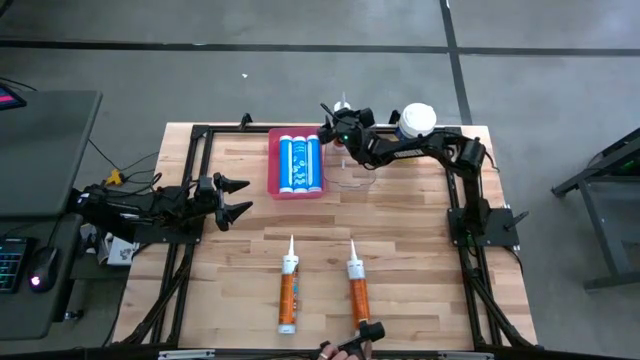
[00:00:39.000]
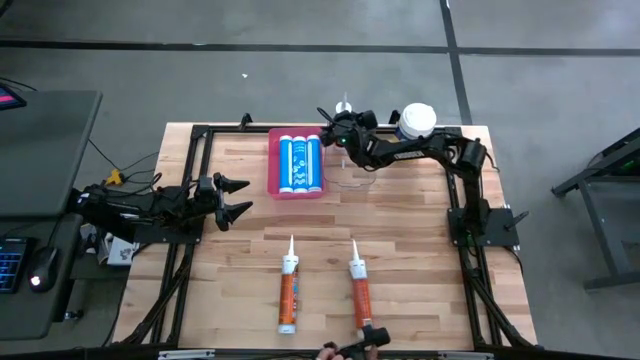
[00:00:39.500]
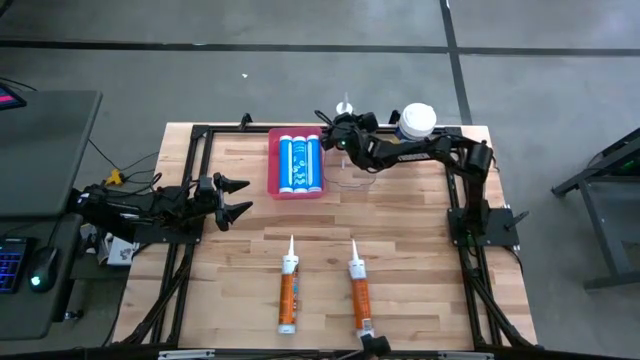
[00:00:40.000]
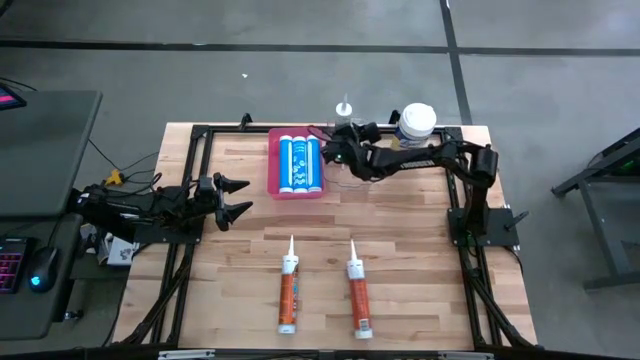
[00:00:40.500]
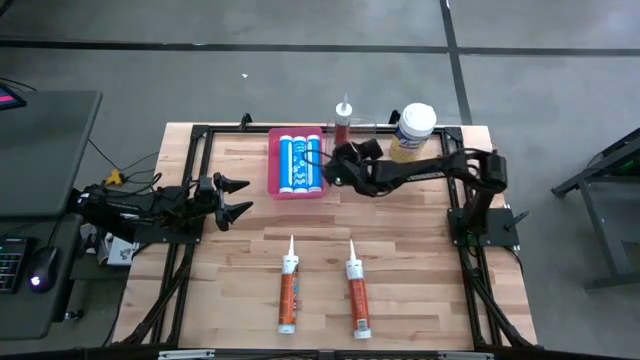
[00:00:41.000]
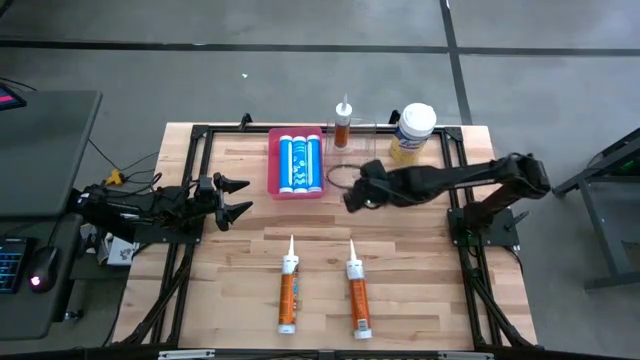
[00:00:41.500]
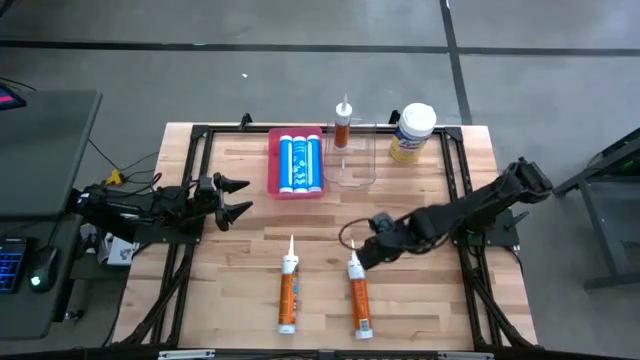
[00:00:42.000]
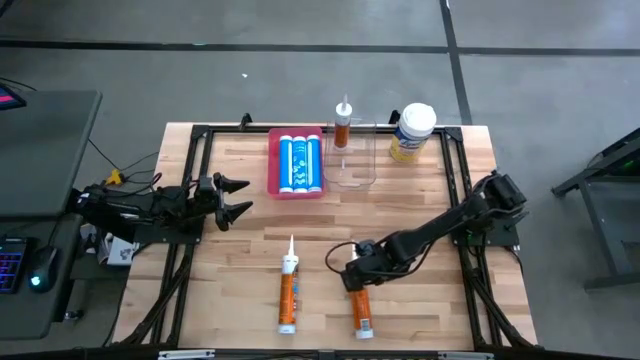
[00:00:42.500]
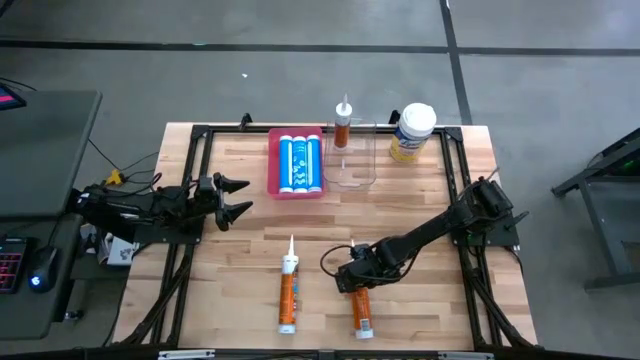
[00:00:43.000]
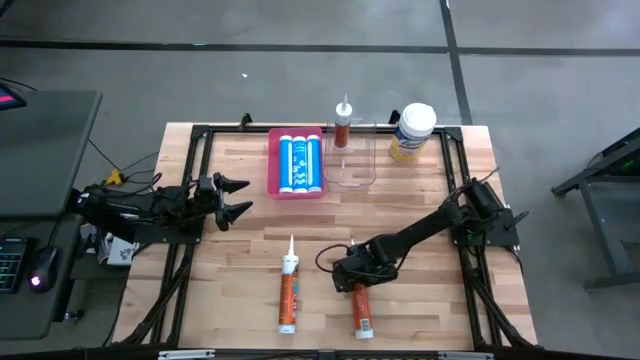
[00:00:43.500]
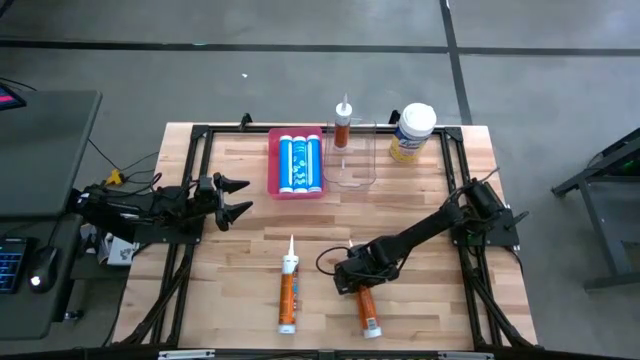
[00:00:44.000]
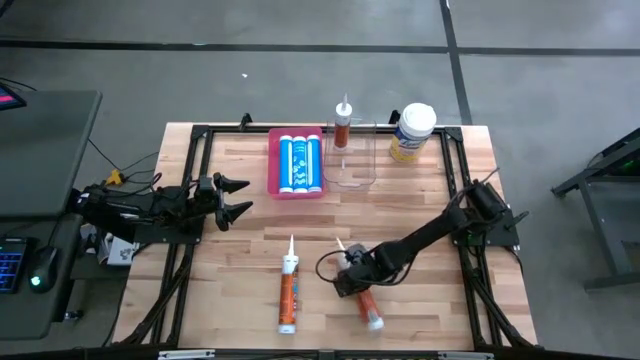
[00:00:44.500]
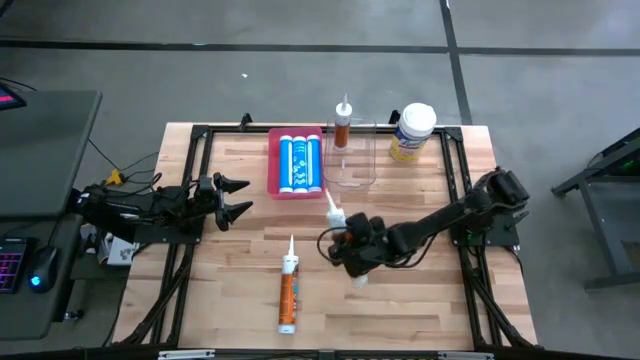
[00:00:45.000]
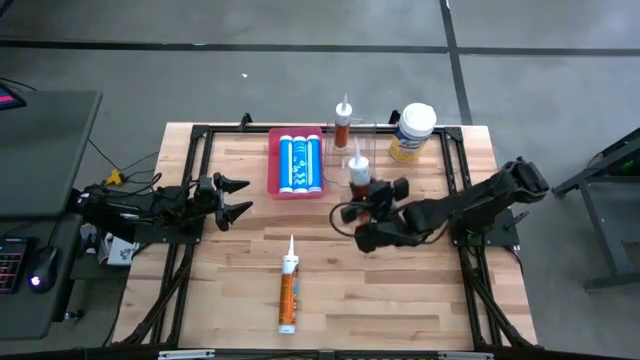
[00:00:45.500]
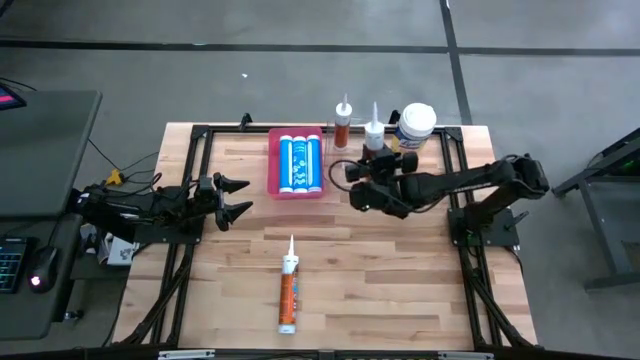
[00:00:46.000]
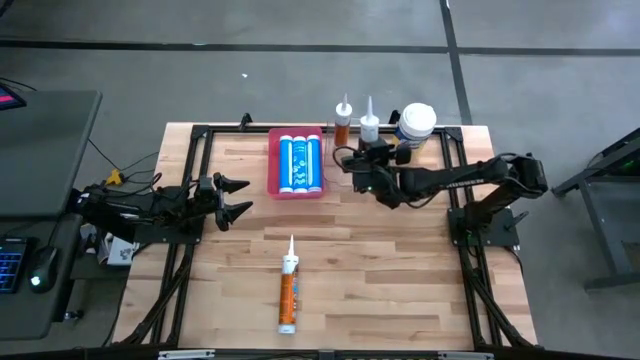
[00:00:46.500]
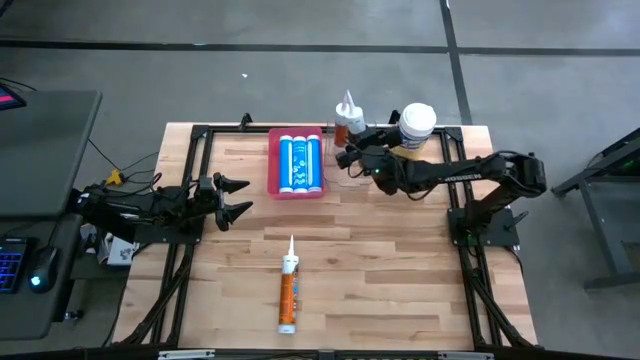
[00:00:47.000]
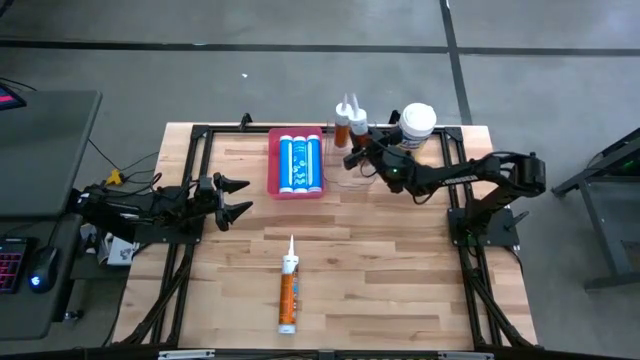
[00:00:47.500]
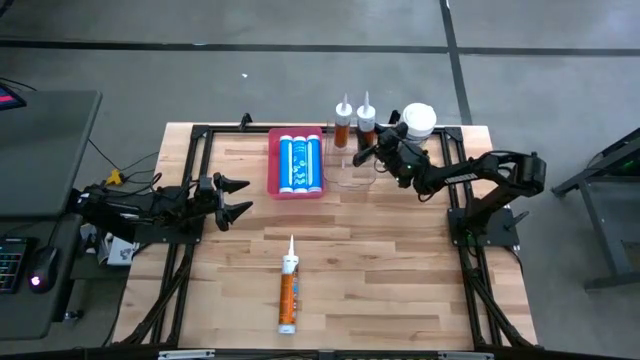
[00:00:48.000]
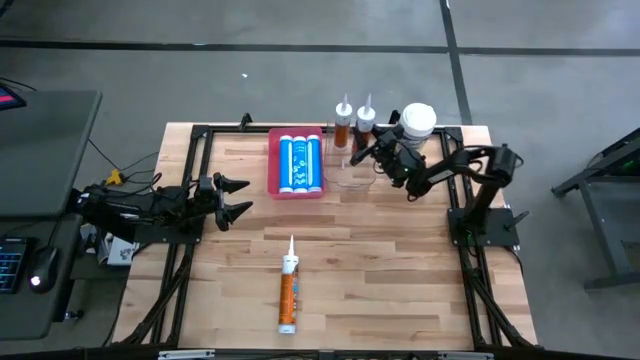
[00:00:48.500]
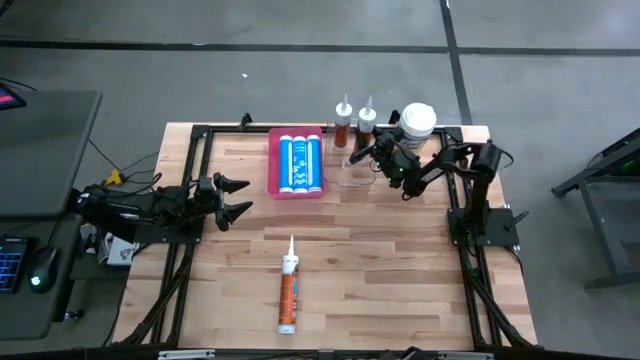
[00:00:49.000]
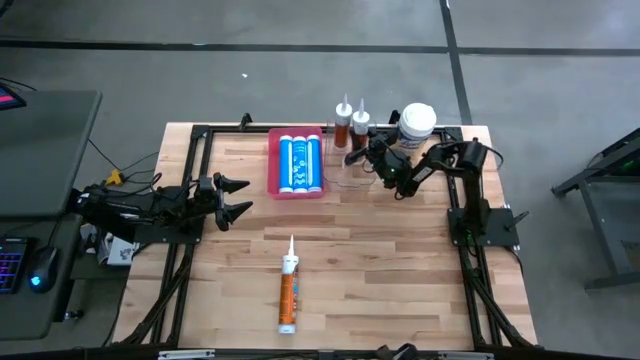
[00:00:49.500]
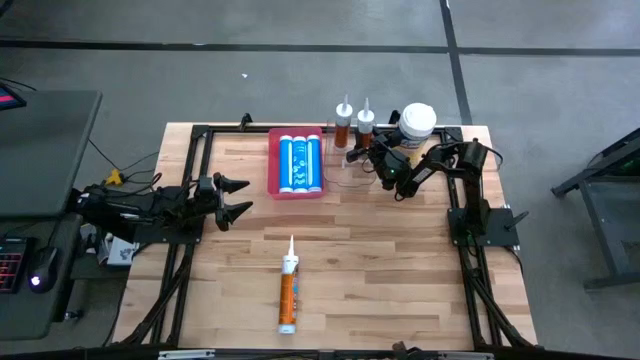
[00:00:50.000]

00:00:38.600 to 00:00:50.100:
Task: Pick & place silicon tubes, Sealant and Lysol wipes
Put the right orange sealant into the transparent bin

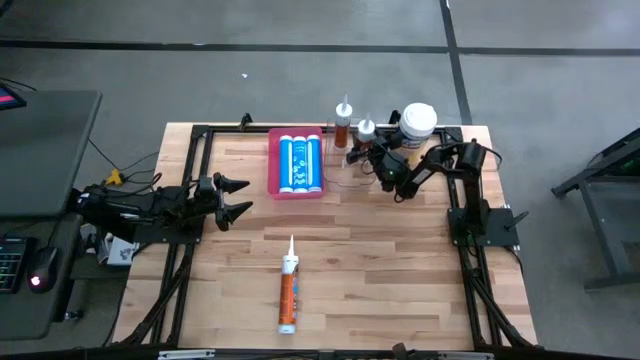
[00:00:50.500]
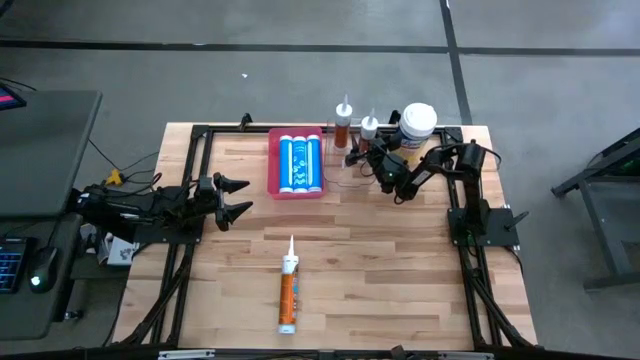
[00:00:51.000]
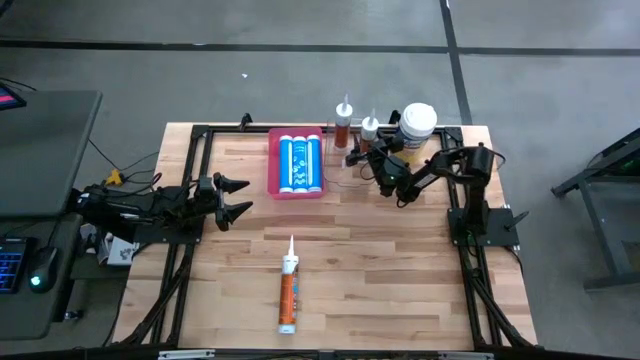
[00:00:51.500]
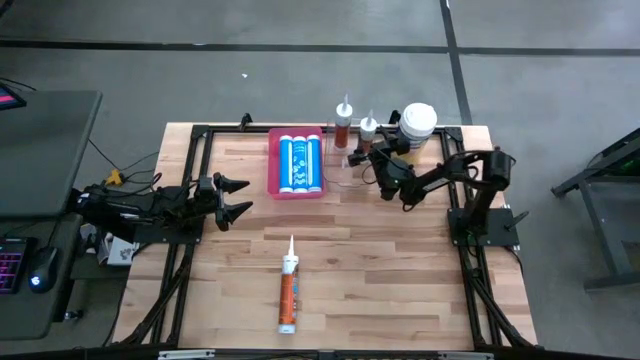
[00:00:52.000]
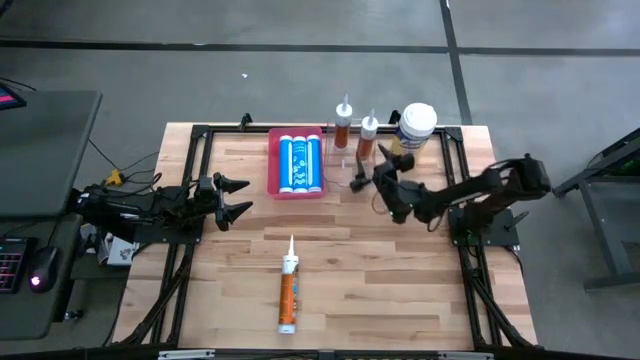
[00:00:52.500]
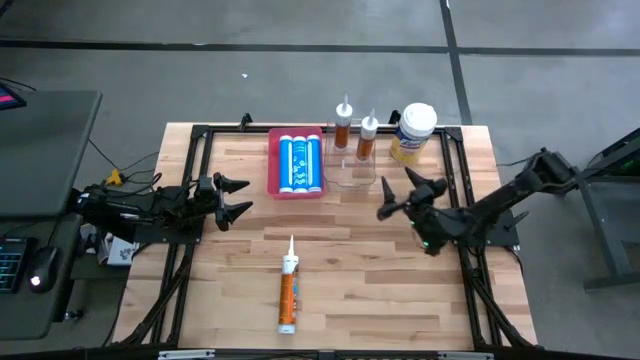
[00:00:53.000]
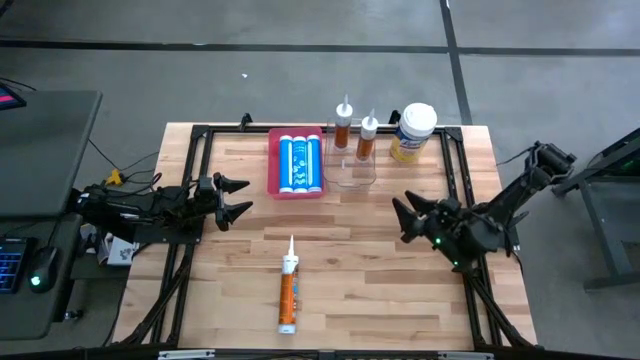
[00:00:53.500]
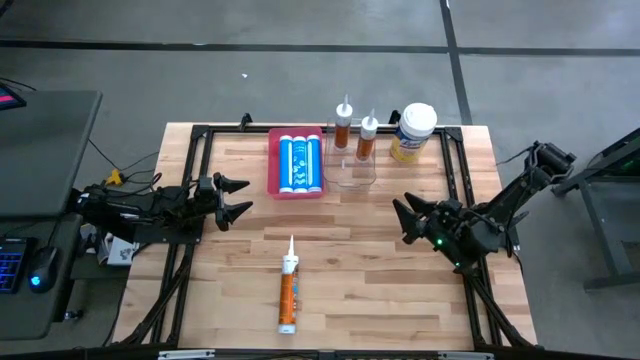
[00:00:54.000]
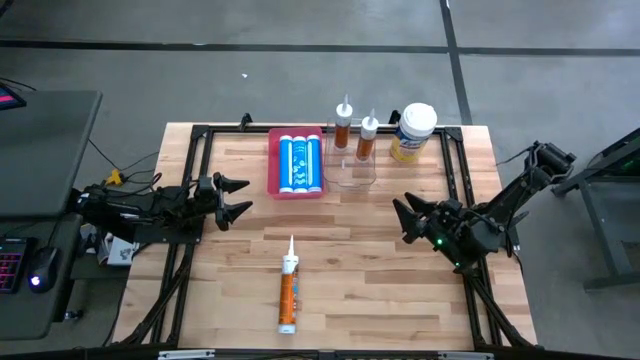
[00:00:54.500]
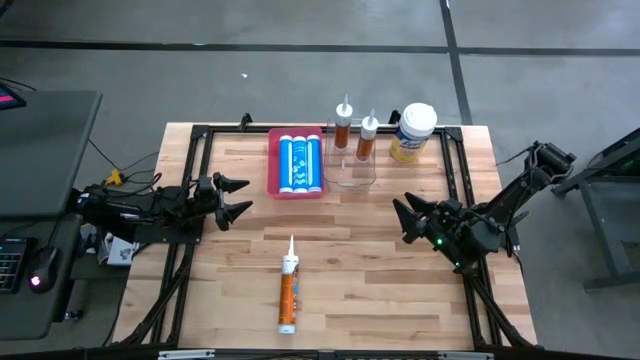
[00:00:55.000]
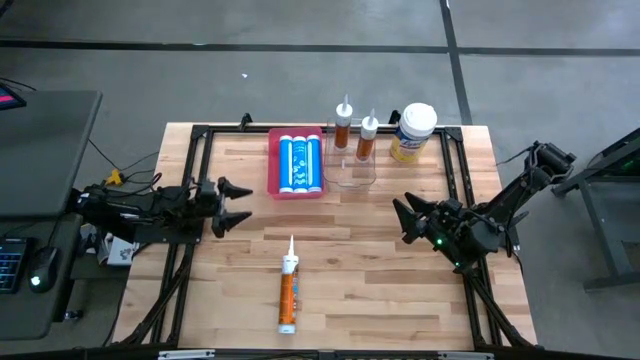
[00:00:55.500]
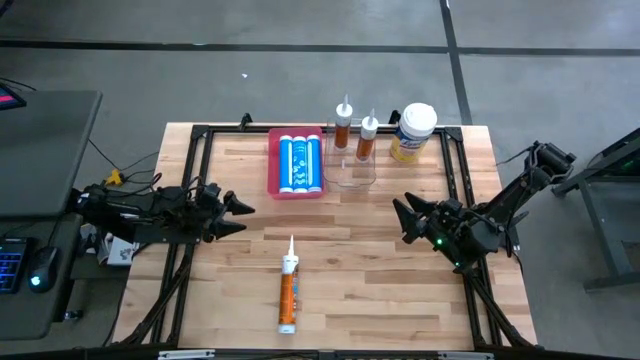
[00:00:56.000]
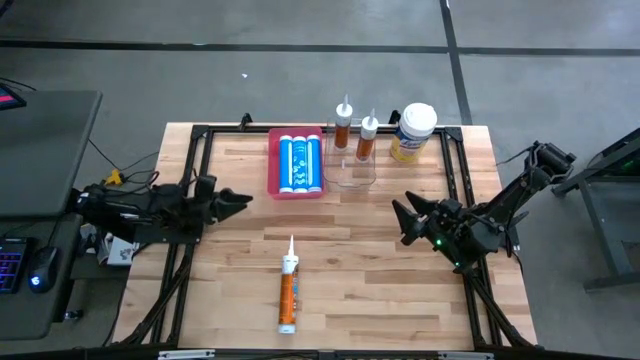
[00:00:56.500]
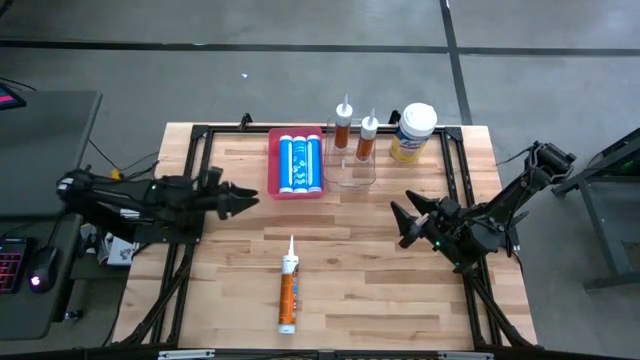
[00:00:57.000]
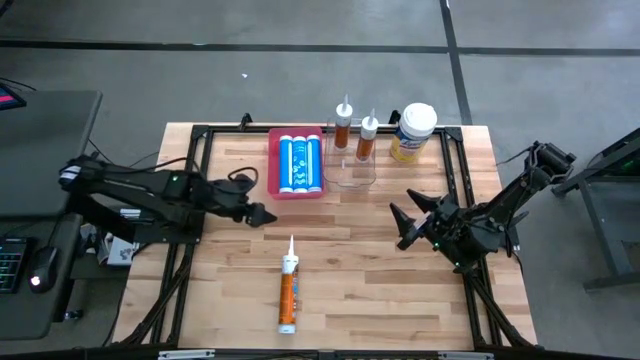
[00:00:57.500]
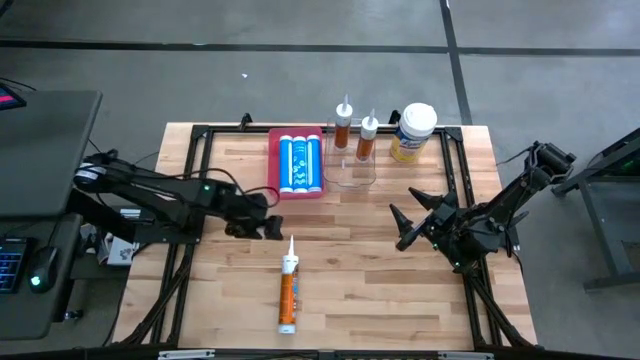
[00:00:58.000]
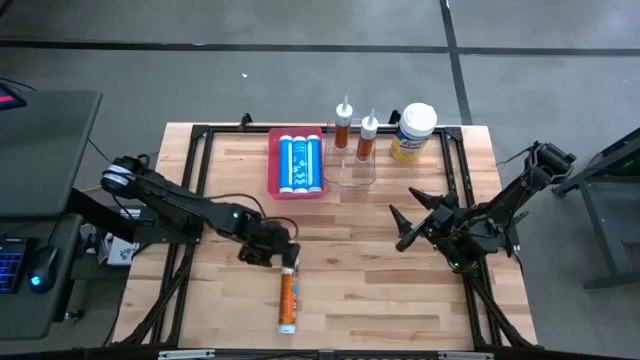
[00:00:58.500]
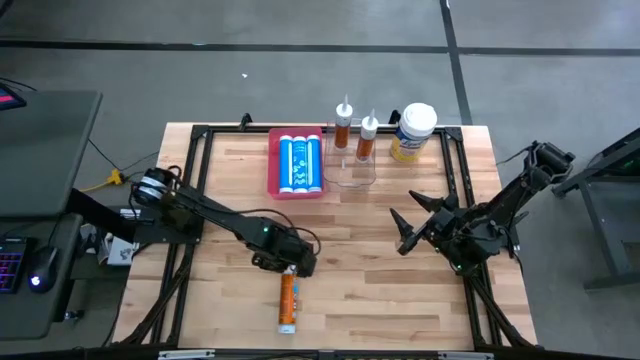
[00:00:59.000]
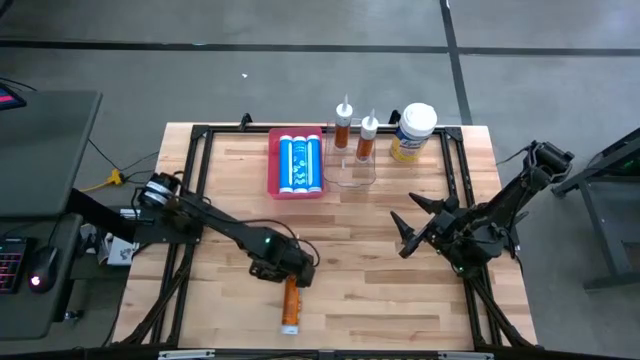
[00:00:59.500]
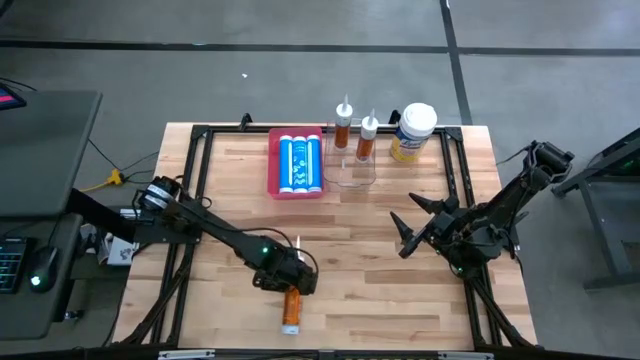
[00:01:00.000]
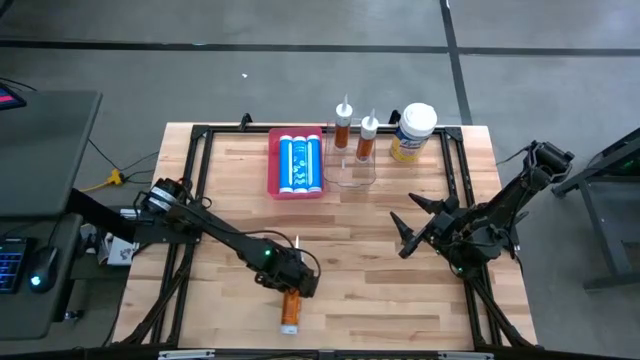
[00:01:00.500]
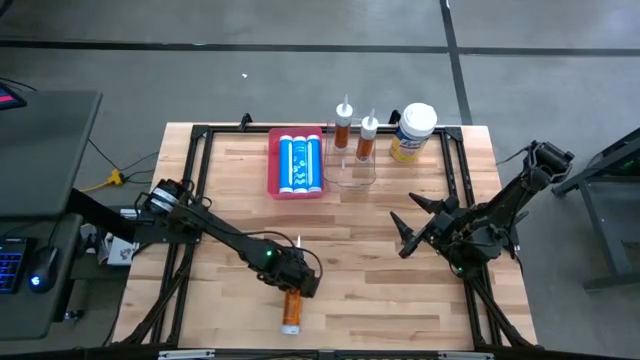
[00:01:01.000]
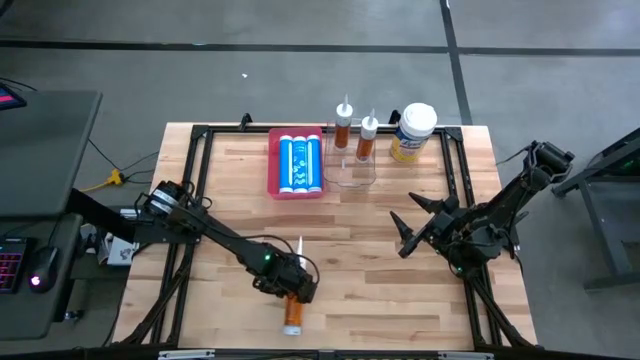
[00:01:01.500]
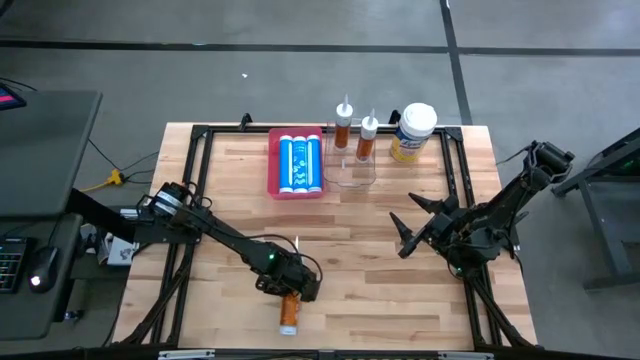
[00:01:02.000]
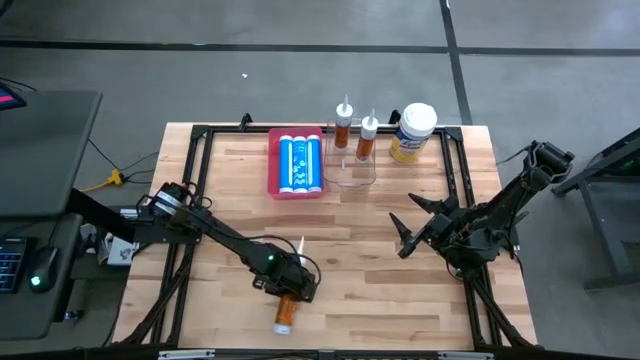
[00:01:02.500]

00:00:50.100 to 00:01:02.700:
Put the orange sealant into the transparent bin
